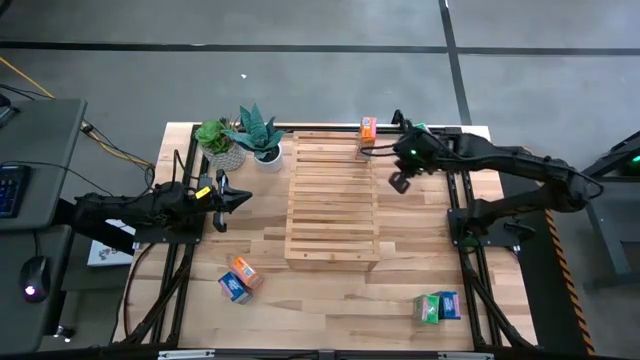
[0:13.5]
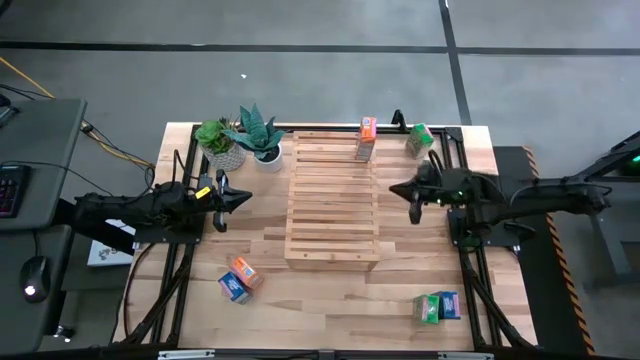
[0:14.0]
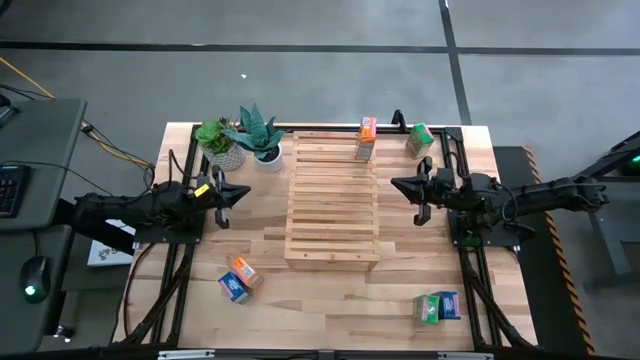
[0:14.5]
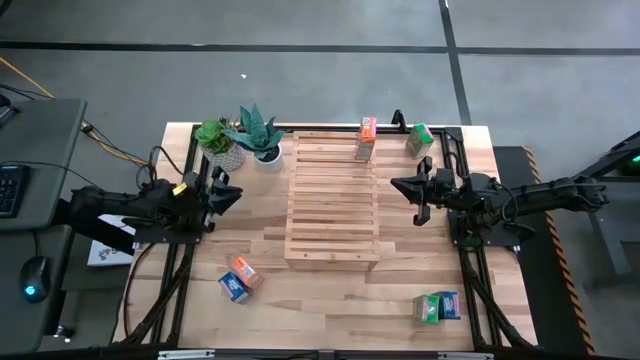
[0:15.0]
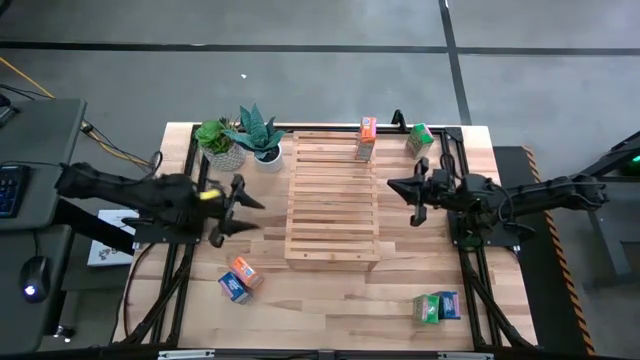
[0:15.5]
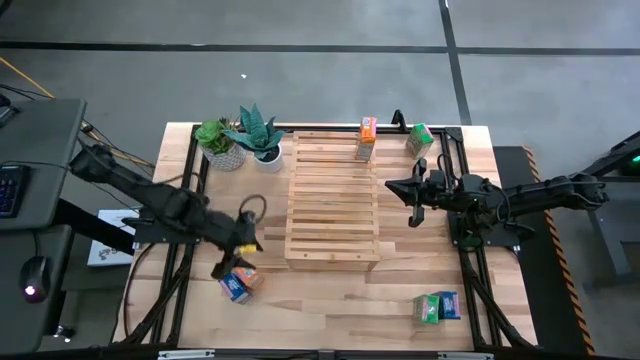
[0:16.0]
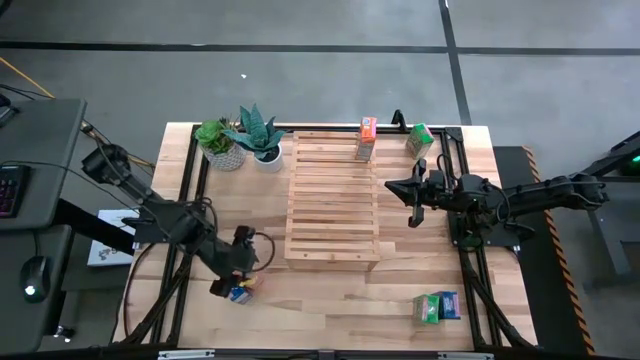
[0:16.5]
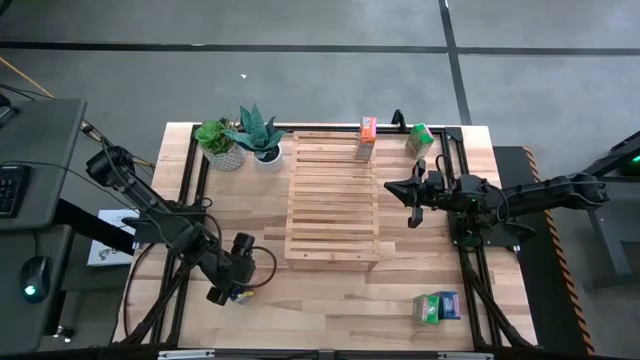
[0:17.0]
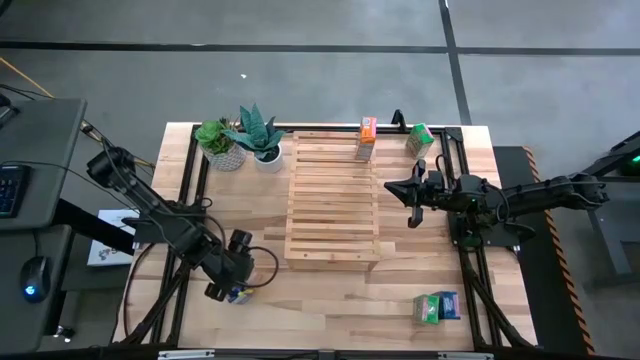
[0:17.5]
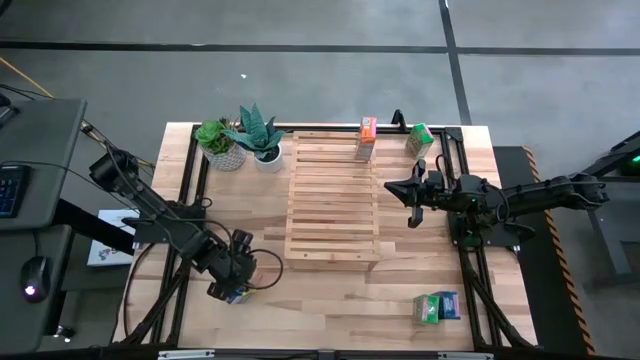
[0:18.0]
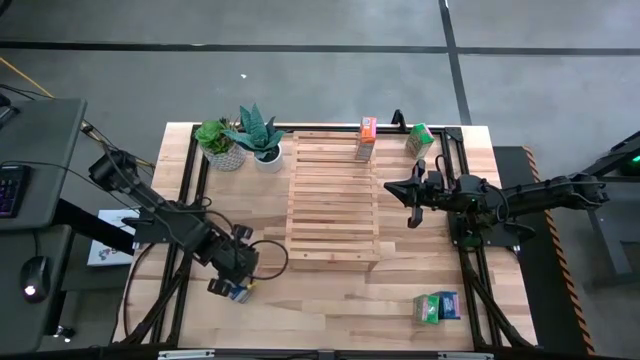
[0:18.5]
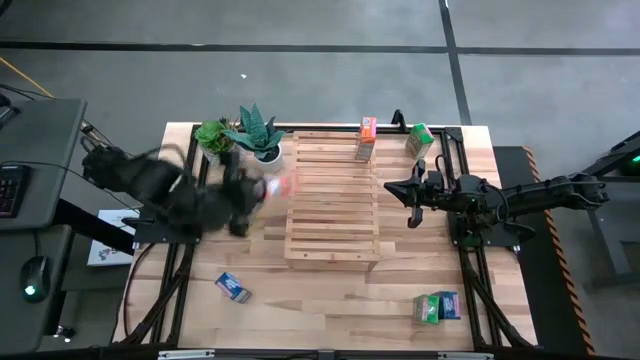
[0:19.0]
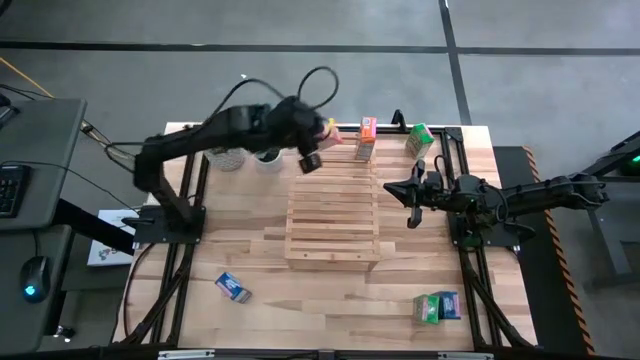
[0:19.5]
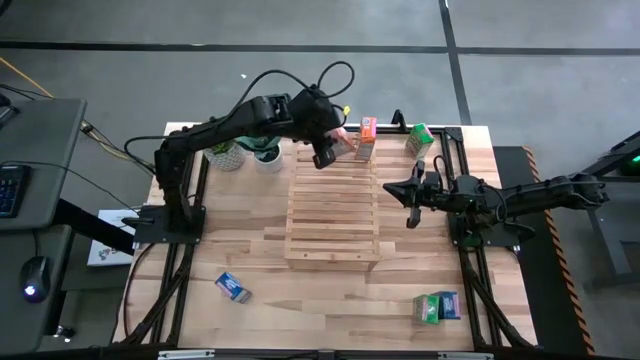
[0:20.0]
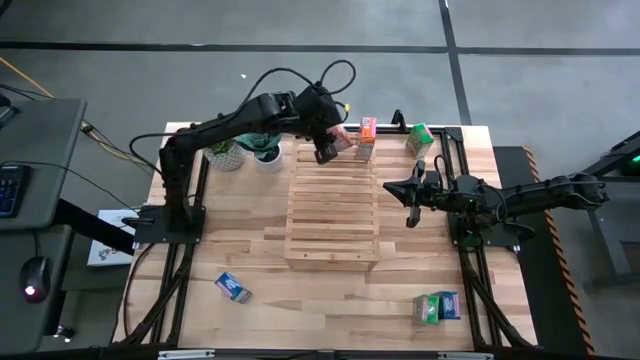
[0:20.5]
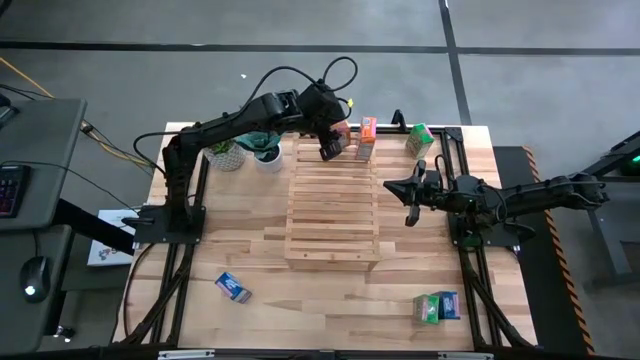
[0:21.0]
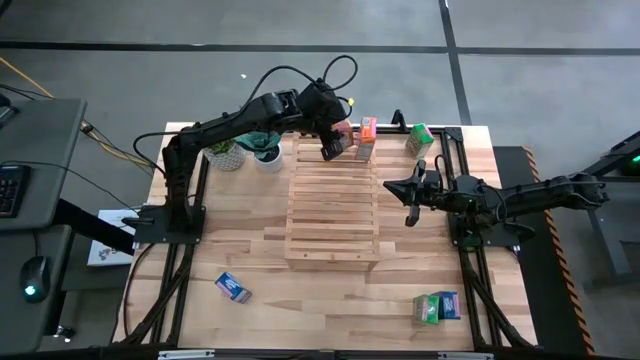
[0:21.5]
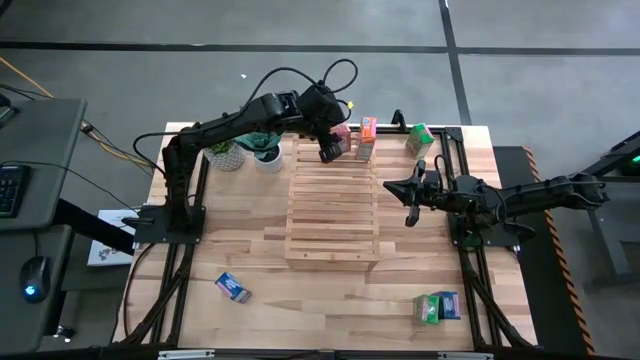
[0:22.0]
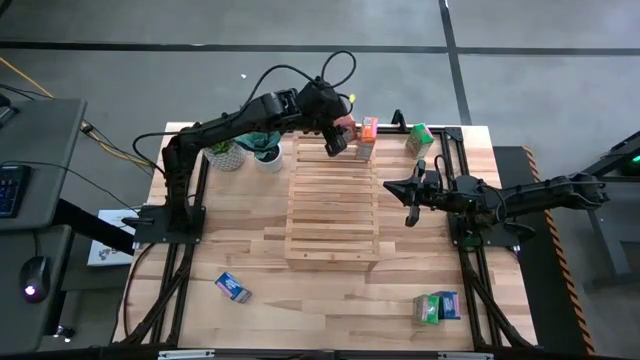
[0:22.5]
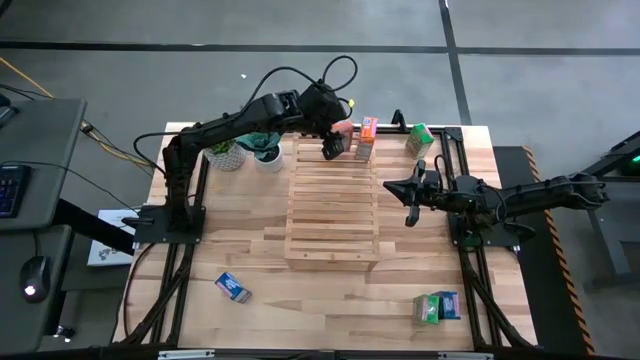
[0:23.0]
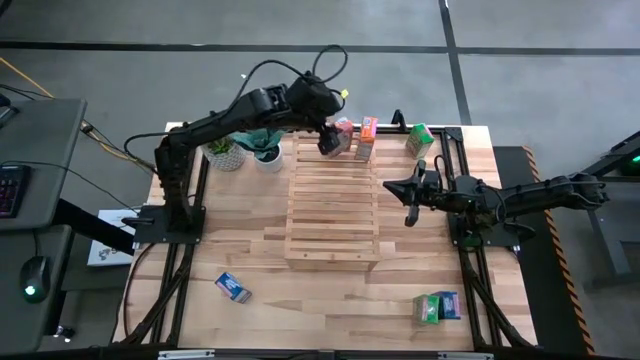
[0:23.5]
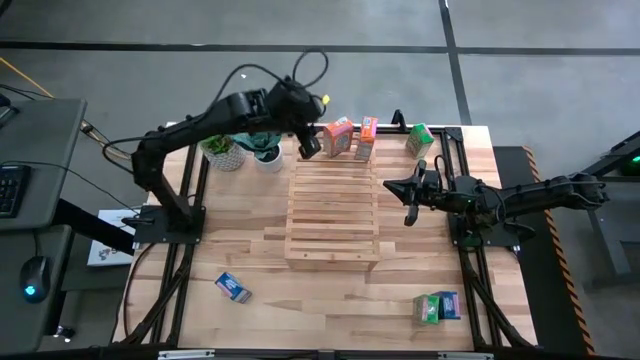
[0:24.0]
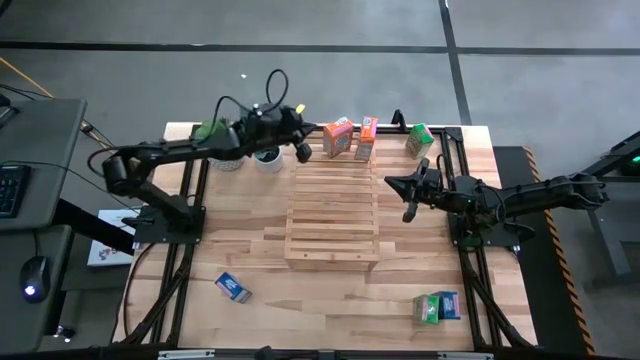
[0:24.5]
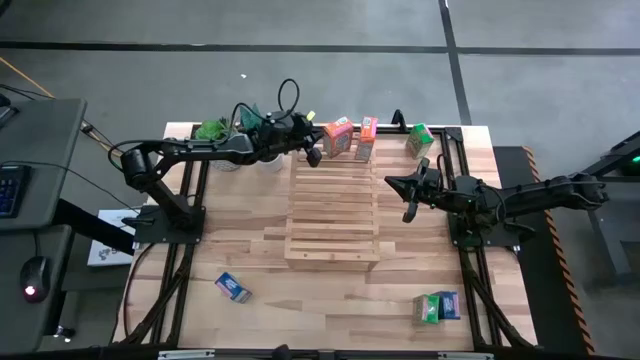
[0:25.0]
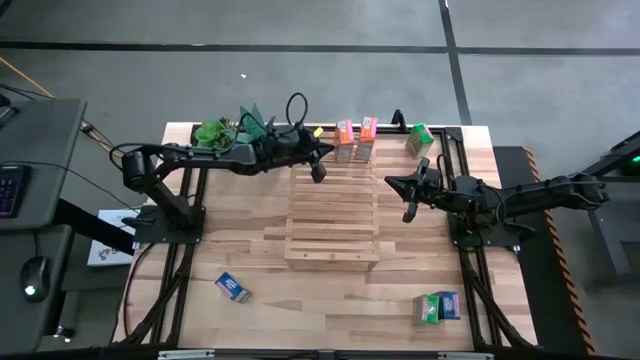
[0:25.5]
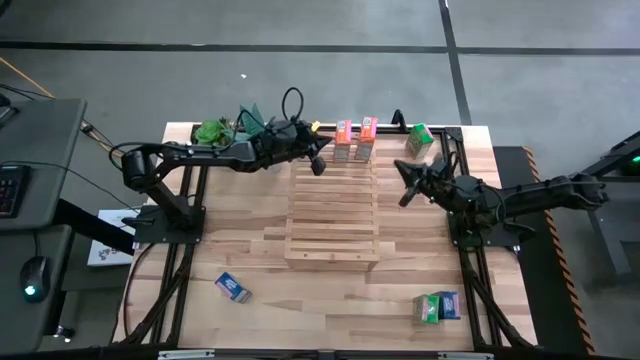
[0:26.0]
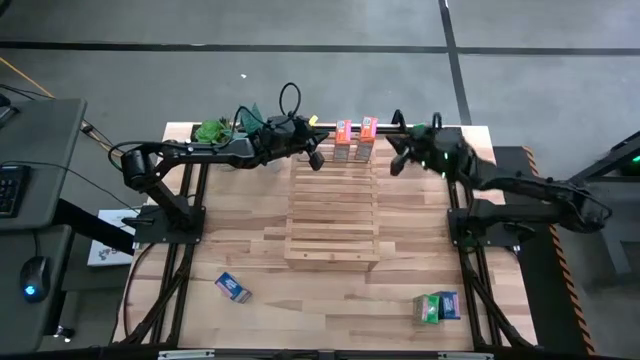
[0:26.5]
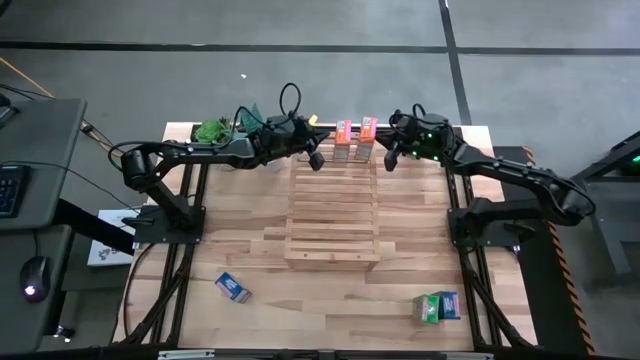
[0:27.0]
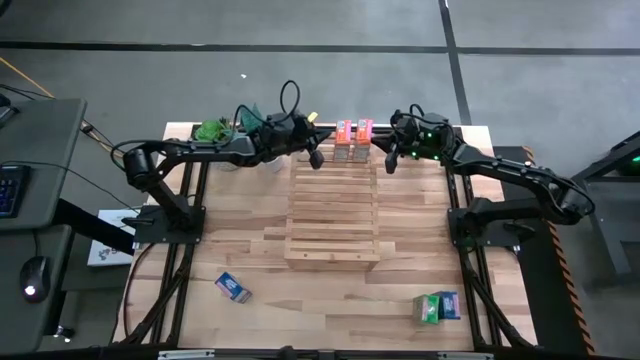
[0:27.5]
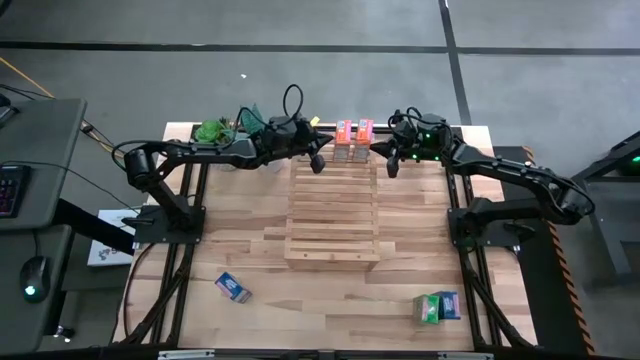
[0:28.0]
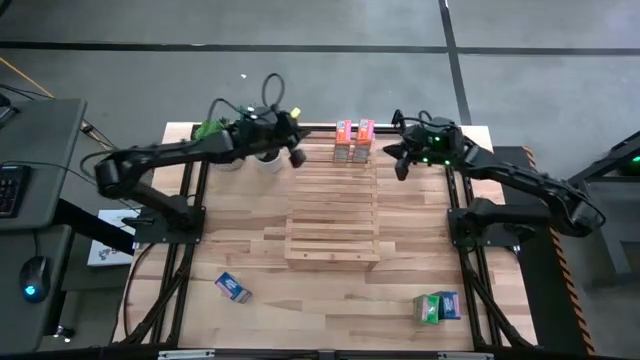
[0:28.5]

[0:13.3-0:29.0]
Task: Stack cereal on shelf
Put the orange cereal box on the shelf aligned with the other orange cereal box

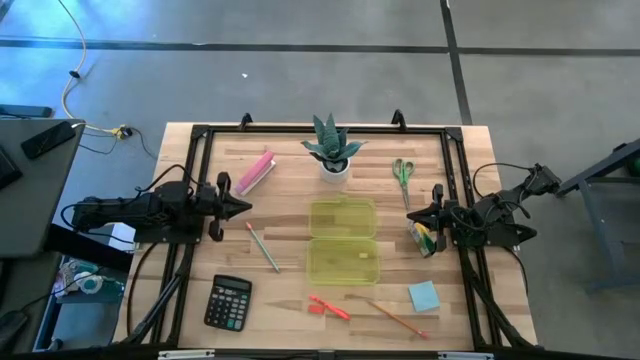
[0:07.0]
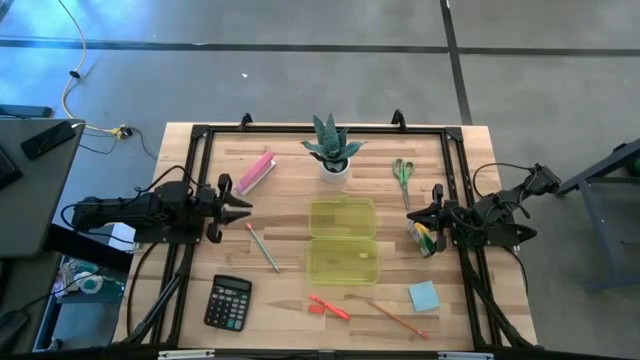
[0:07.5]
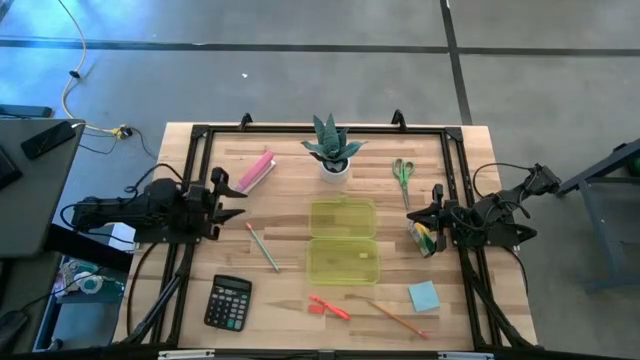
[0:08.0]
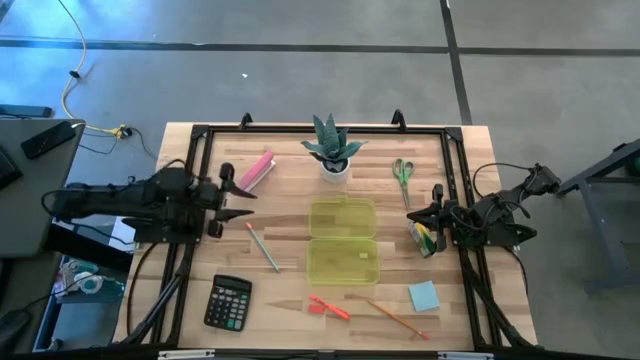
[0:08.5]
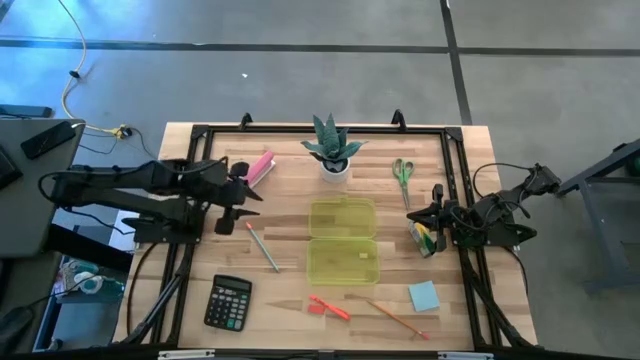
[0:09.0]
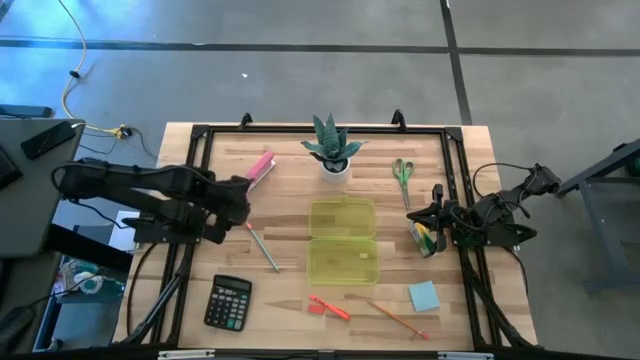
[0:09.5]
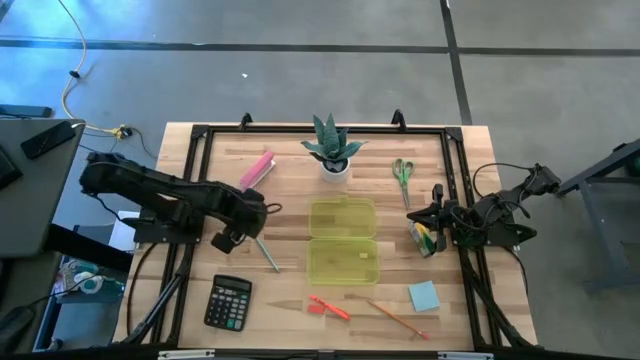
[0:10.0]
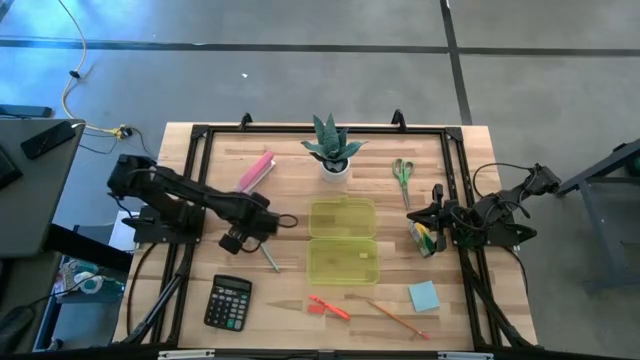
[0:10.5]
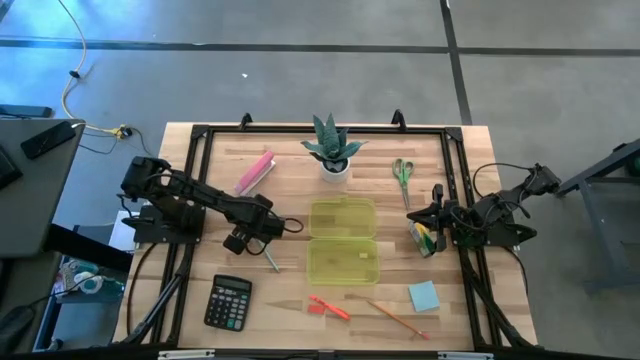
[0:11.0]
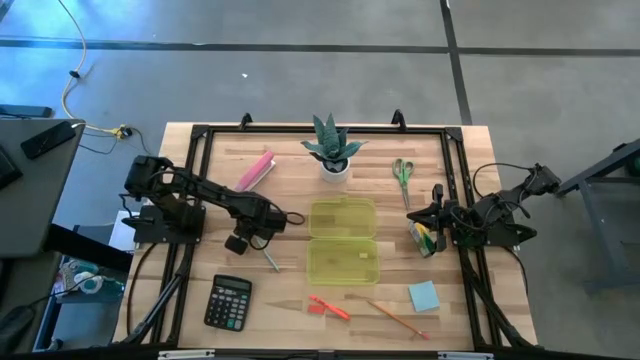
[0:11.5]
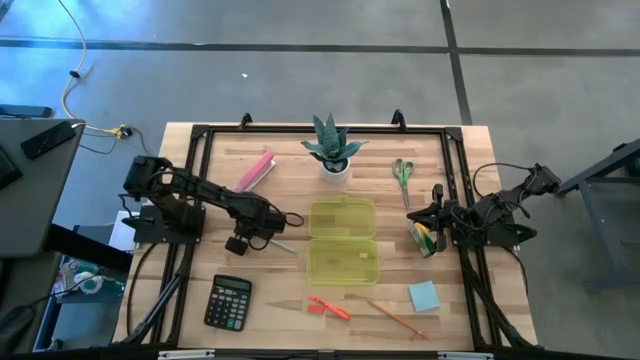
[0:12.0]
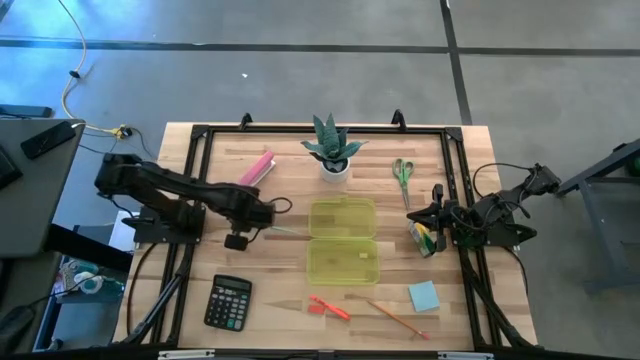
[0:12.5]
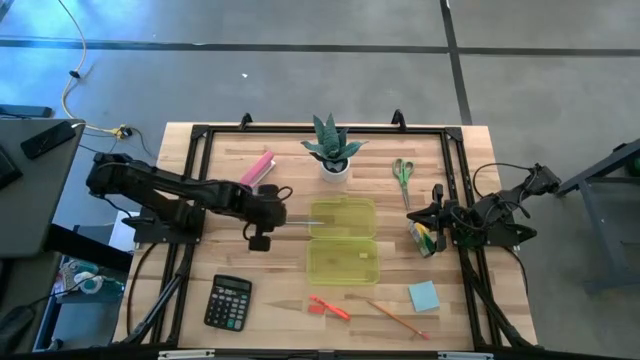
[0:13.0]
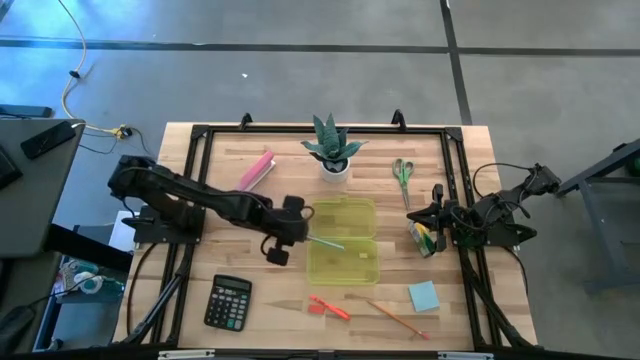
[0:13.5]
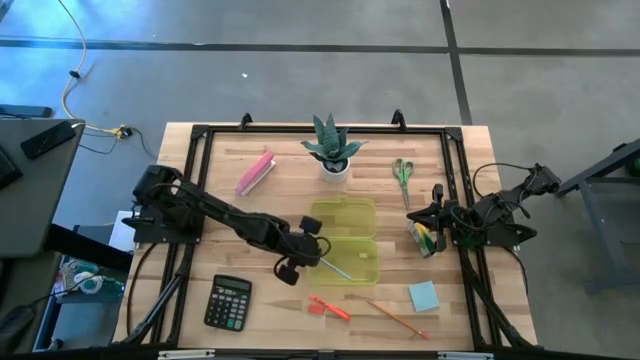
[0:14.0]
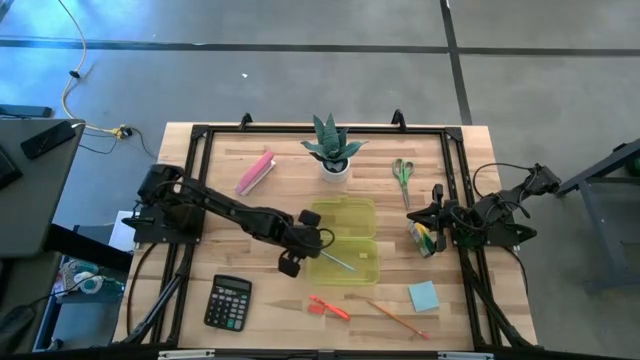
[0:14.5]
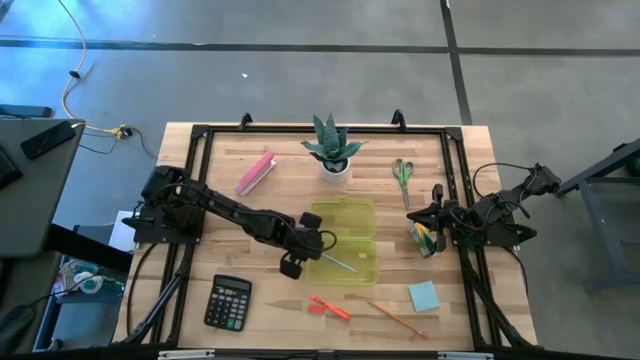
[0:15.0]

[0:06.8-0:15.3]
Task: Pack school essentials
Put the blue pencil into the supply box
